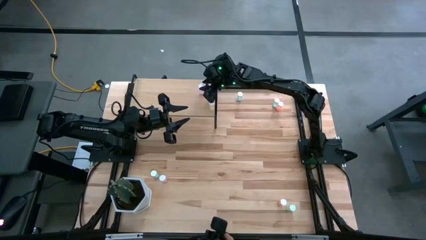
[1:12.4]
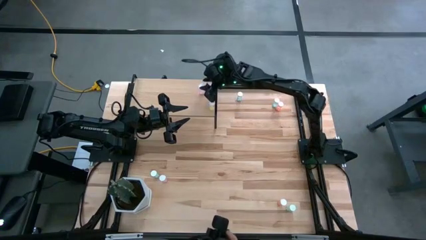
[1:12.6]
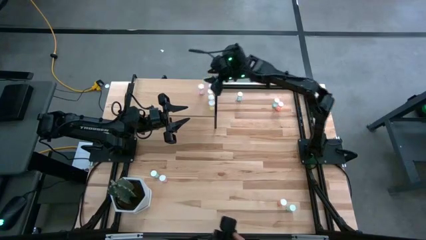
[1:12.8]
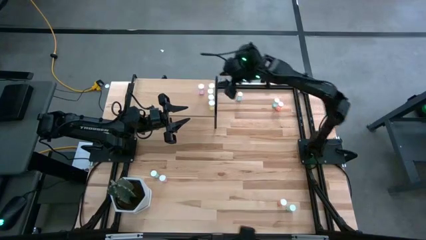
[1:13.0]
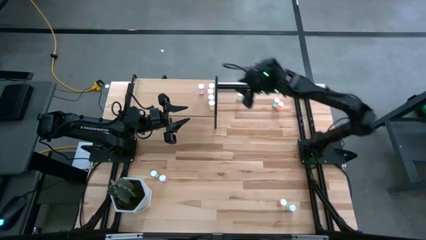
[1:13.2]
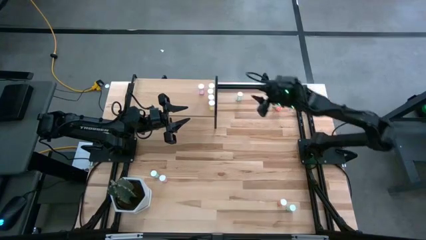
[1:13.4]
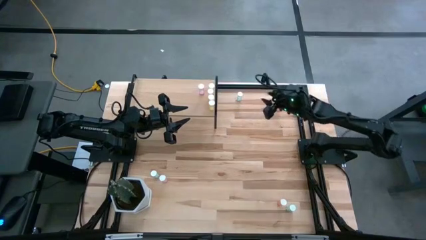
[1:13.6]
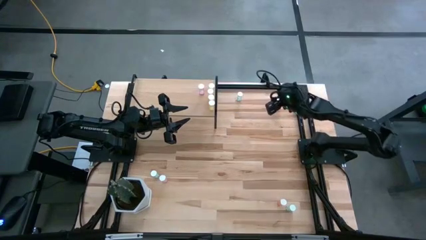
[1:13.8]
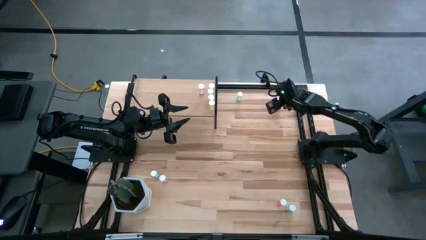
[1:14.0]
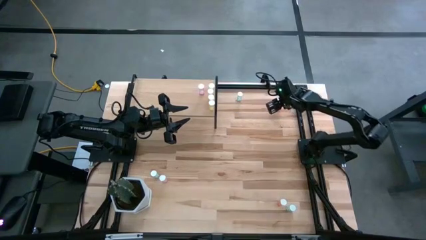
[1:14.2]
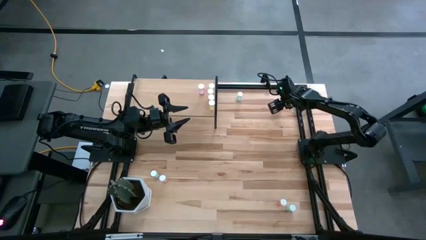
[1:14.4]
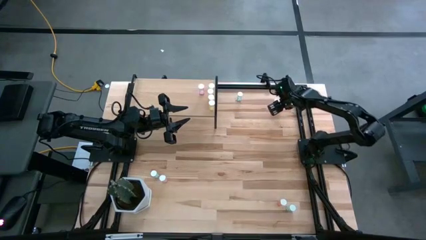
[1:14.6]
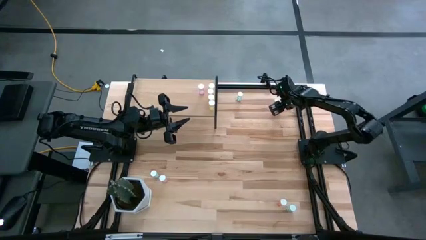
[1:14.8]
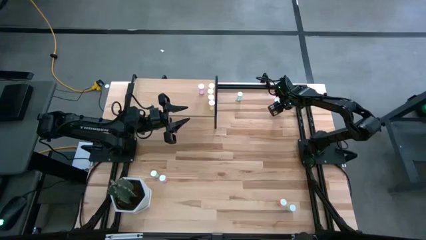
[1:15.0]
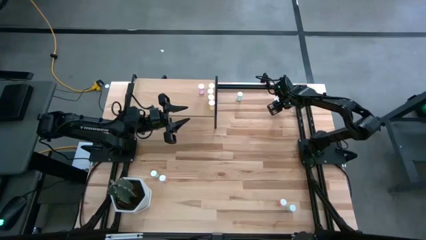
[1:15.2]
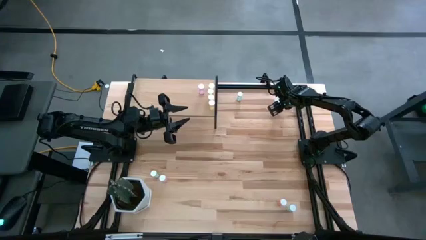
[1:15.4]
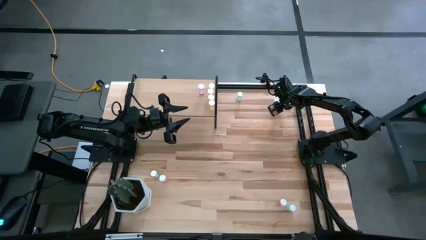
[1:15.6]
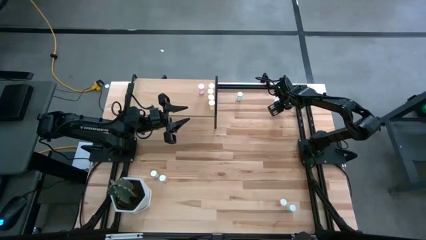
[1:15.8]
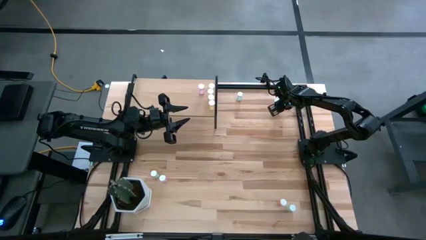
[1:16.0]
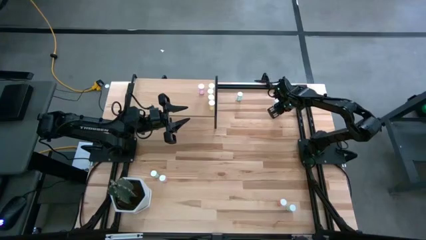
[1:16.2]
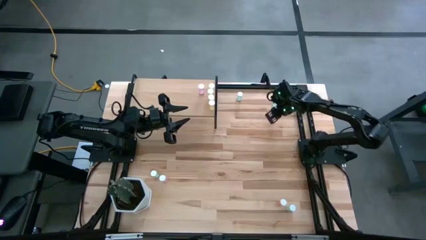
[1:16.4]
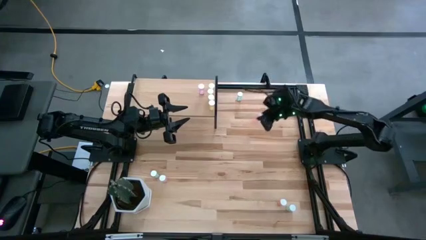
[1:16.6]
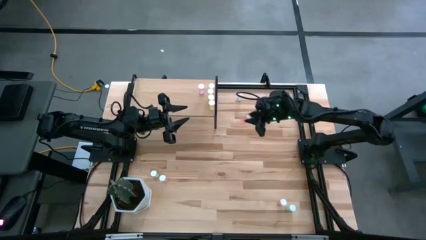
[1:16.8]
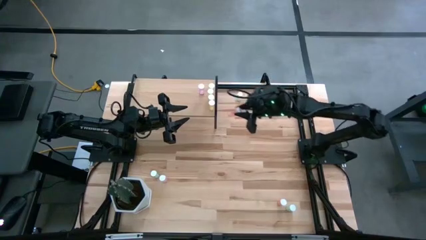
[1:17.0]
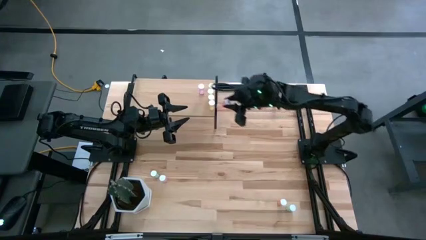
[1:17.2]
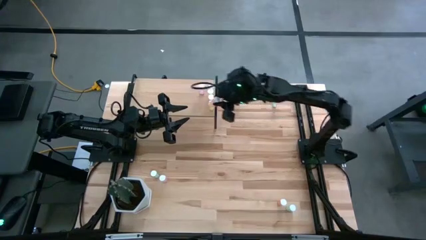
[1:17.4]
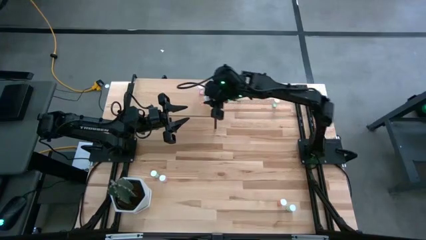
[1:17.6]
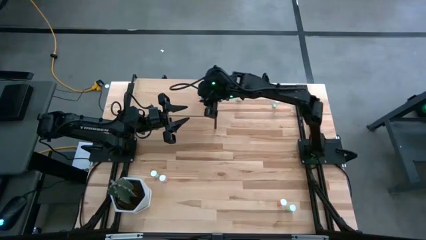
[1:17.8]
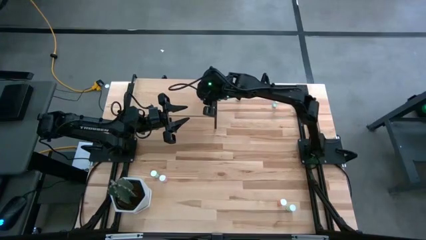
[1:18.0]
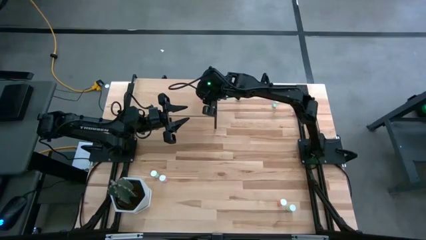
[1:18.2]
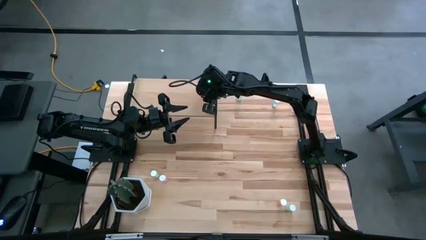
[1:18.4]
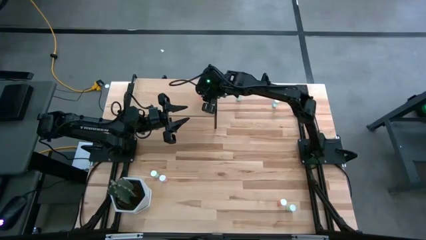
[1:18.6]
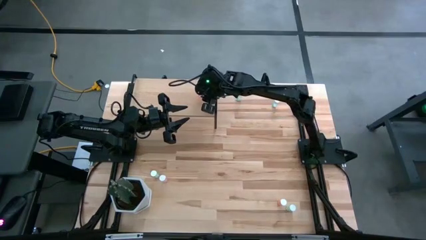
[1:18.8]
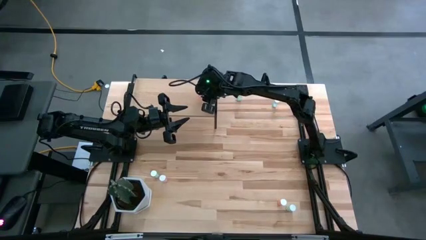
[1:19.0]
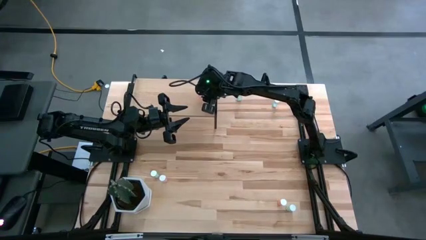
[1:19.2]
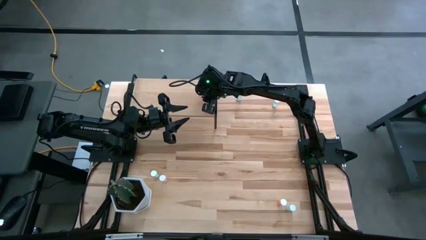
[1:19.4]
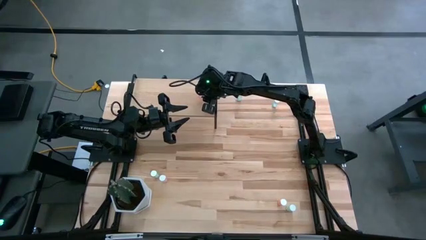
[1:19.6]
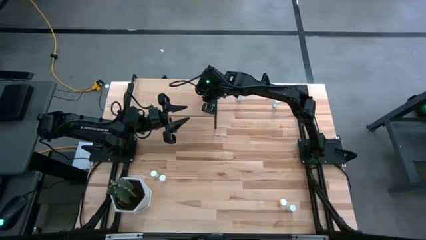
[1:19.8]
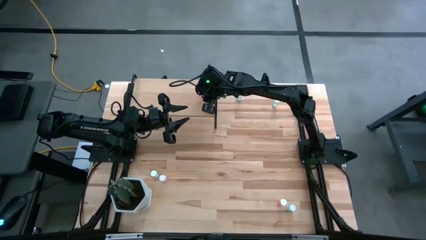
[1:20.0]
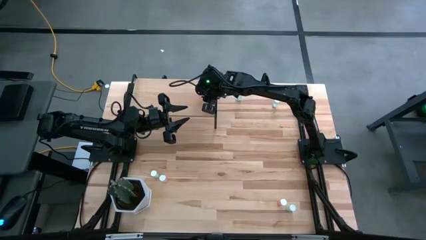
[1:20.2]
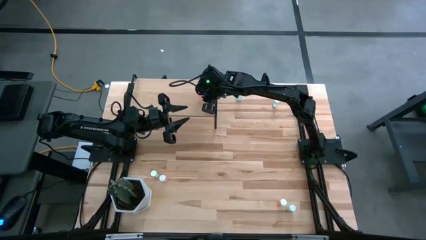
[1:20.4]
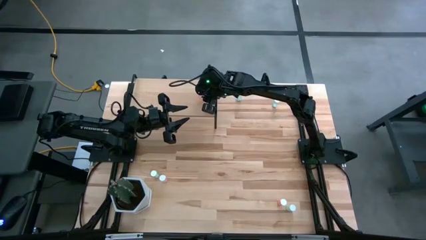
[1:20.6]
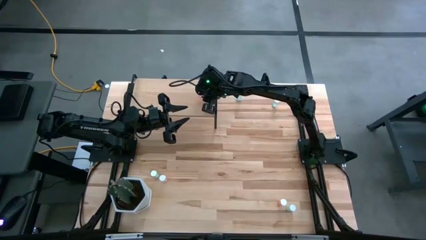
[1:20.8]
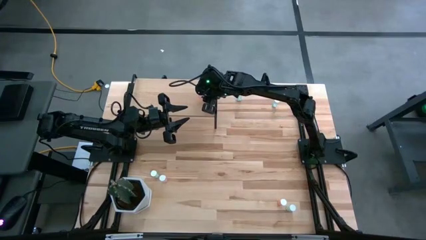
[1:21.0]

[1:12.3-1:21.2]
Task: Pick and place medicine bottles onto shelf by color
Put the top orange pill bottle on the shelf

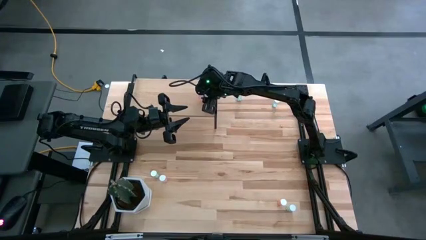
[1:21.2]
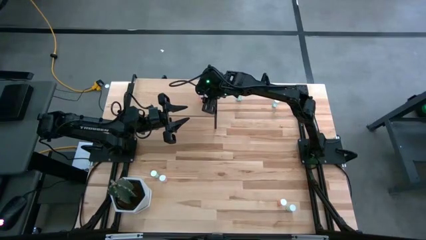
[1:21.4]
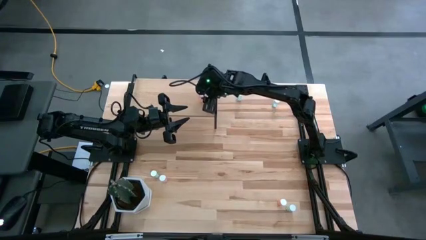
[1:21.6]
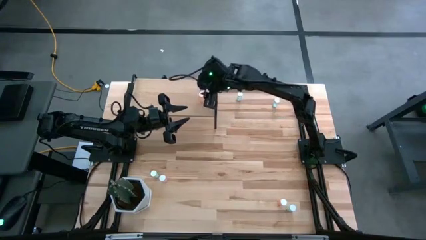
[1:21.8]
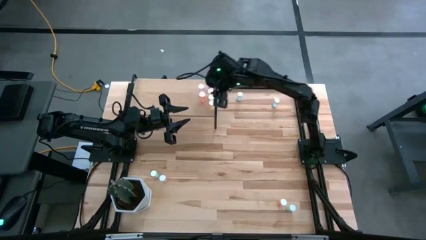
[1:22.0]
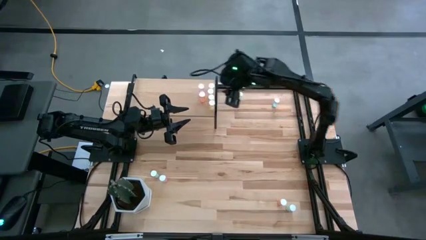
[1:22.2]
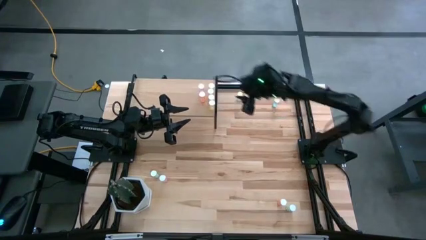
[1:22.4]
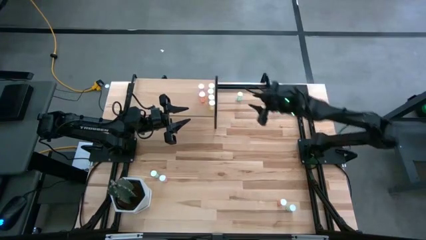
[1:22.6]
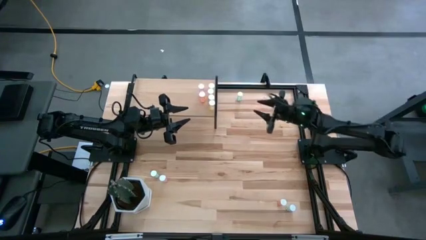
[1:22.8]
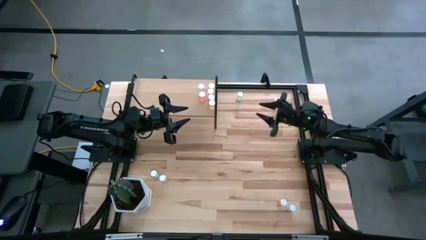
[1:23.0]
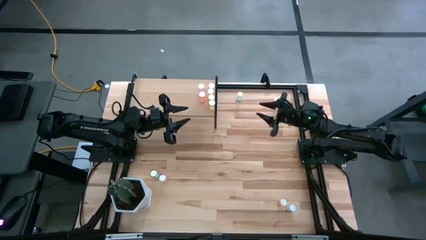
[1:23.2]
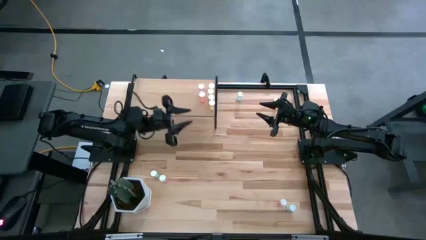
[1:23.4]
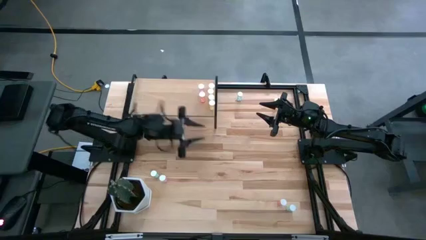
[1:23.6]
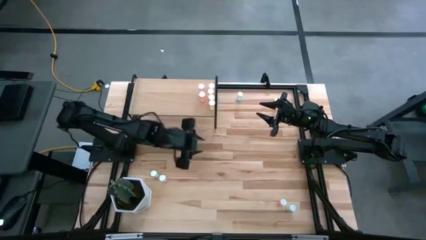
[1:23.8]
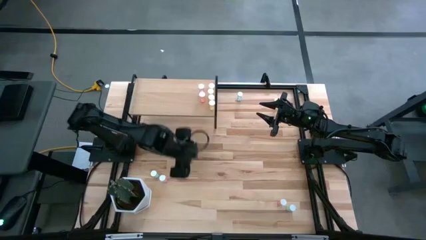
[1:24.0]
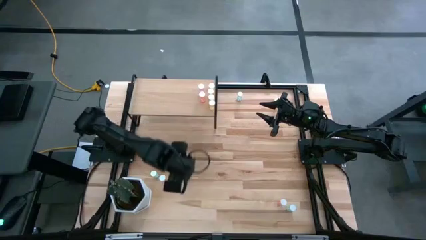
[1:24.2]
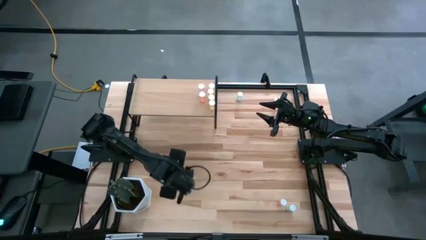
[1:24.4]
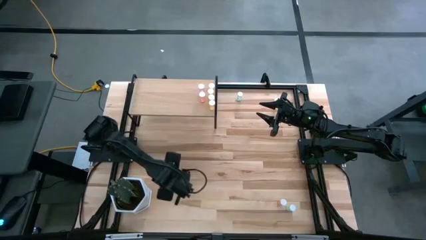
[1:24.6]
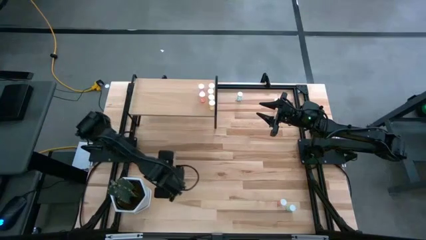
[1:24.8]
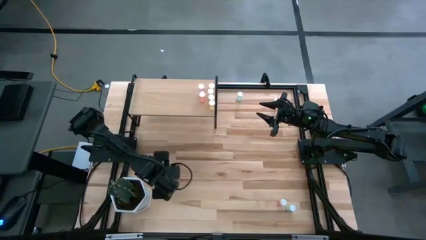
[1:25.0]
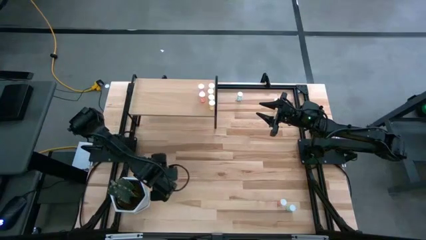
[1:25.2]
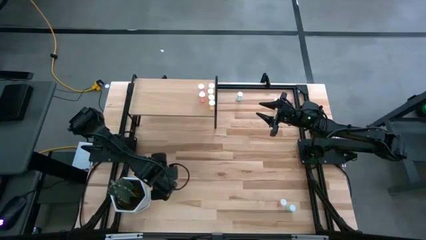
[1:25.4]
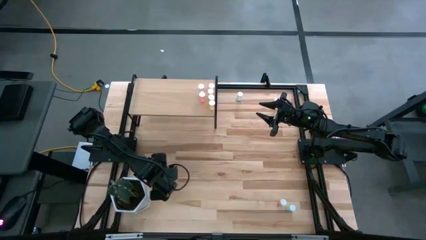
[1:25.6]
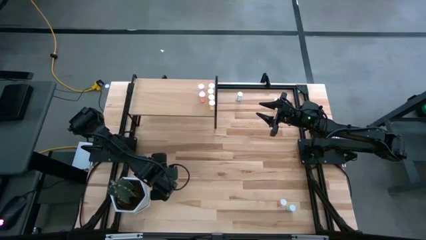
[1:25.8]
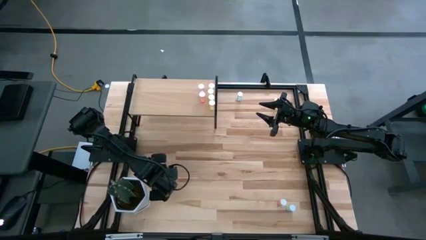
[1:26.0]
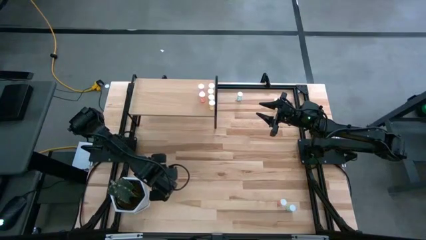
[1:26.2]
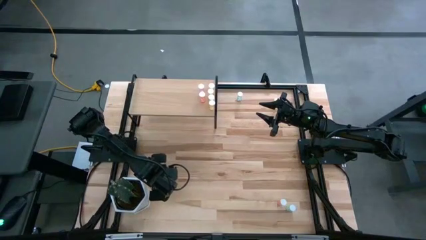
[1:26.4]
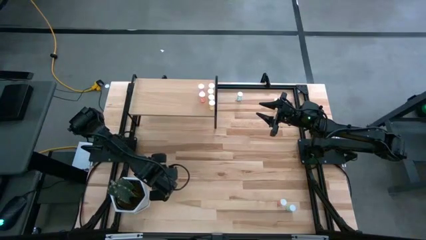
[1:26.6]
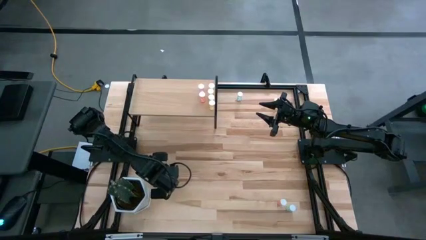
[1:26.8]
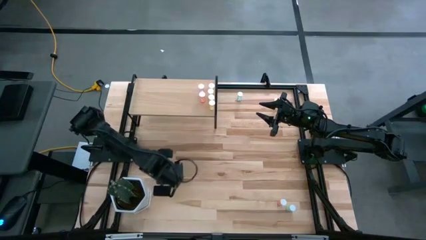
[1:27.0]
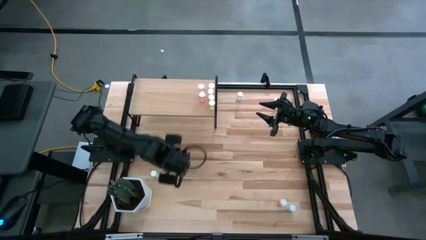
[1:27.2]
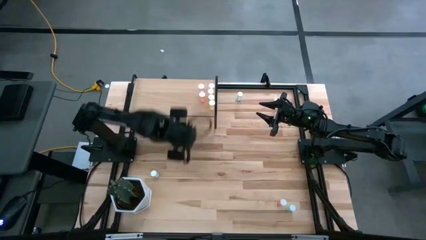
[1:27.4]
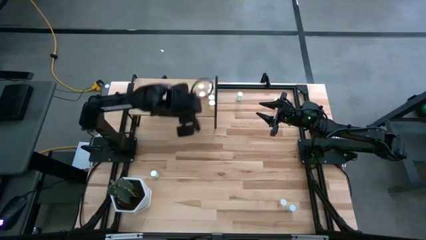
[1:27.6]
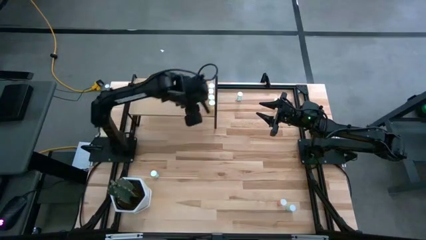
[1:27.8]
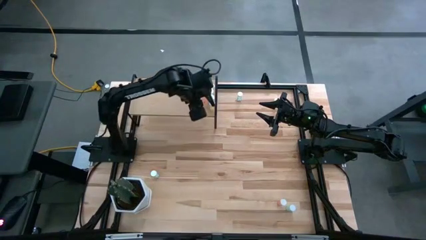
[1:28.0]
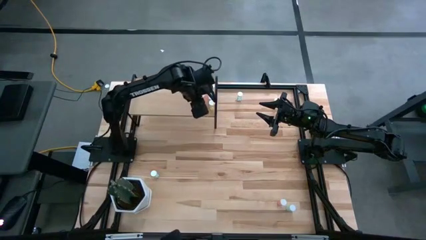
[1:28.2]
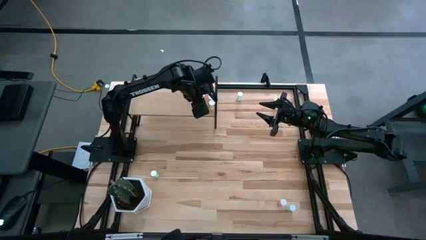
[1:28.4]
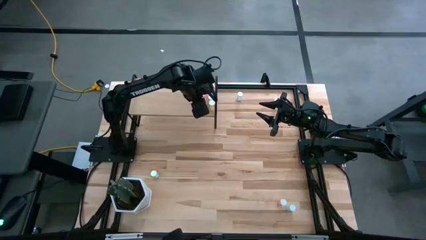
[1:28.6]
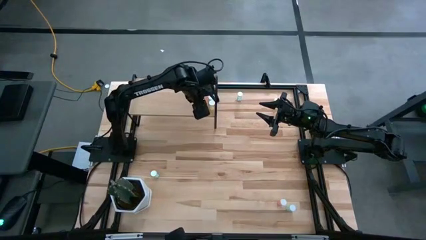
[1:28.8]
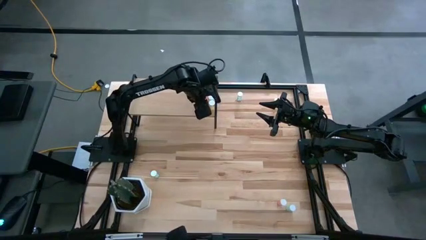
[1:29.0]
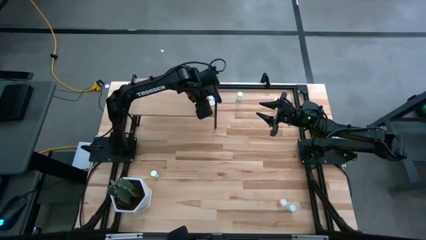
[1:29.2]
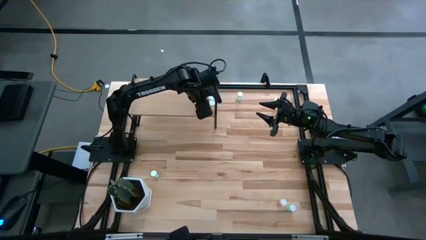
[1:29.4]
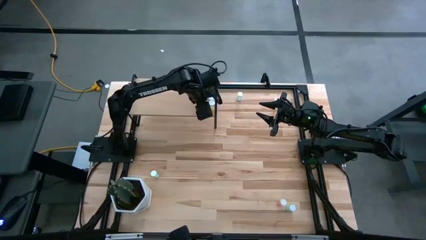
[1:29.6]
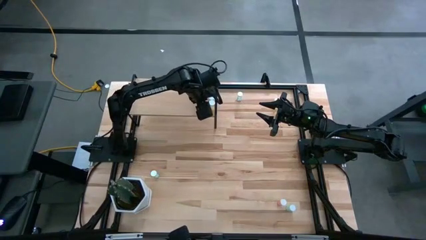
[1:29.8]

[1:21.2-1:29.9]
Put the pink pill bottle on the shelf
